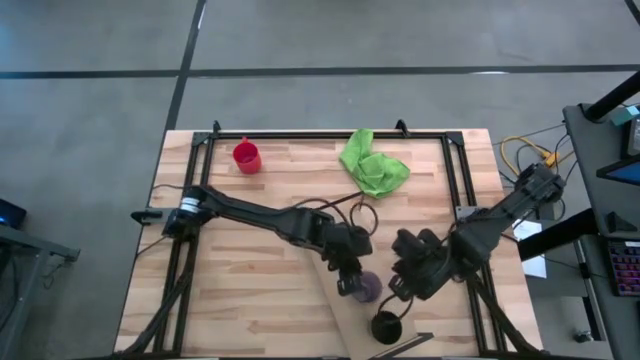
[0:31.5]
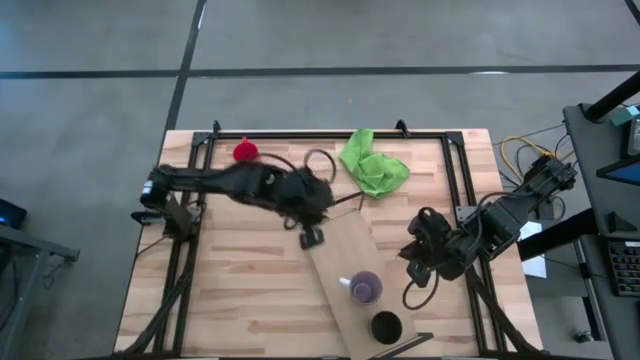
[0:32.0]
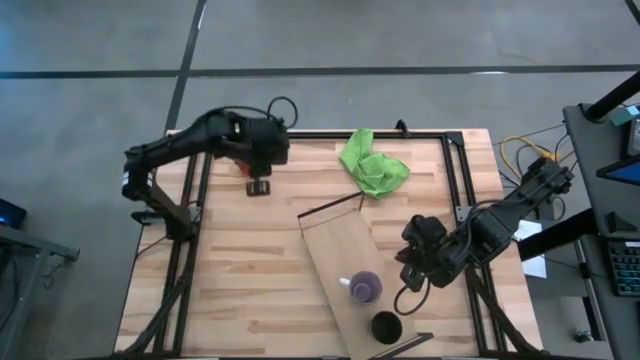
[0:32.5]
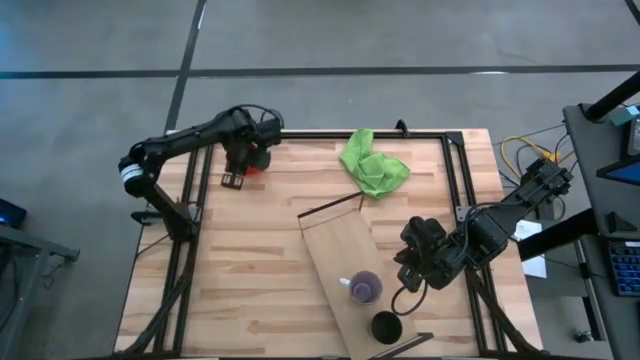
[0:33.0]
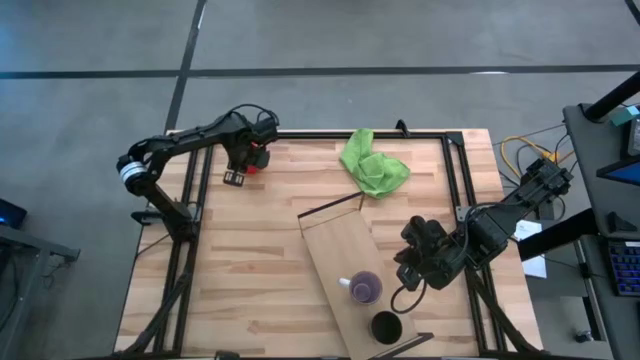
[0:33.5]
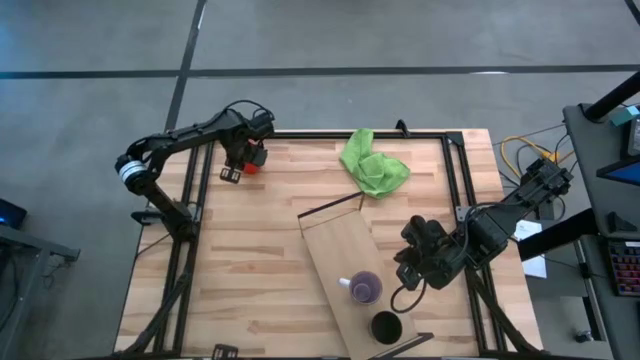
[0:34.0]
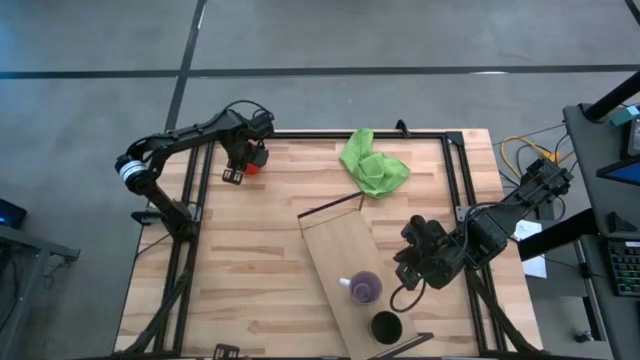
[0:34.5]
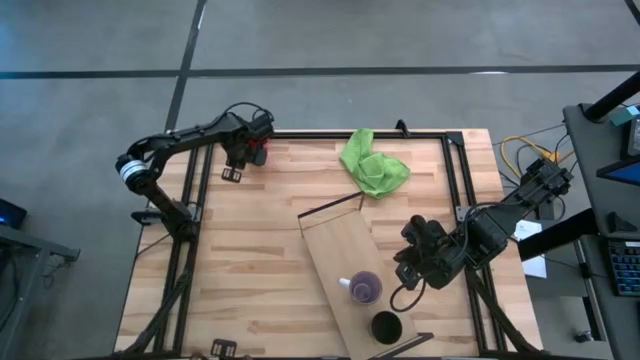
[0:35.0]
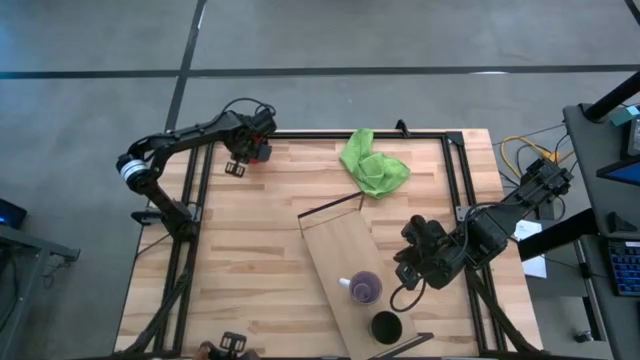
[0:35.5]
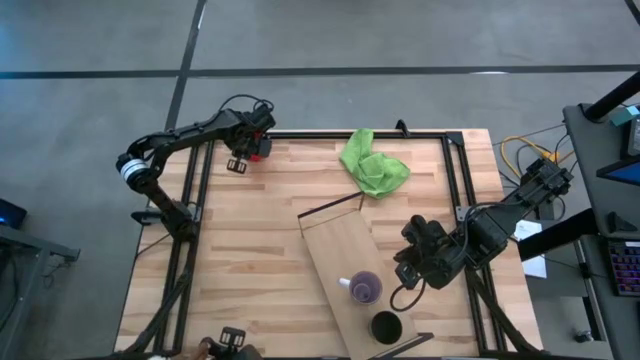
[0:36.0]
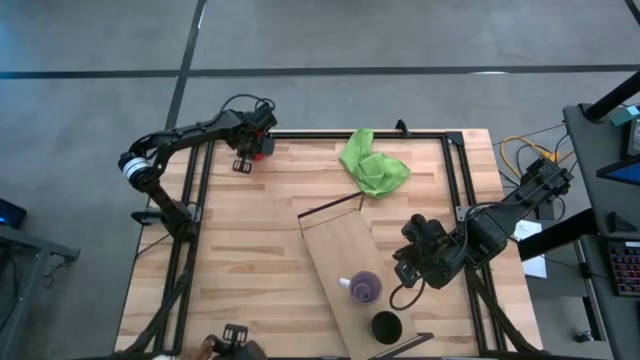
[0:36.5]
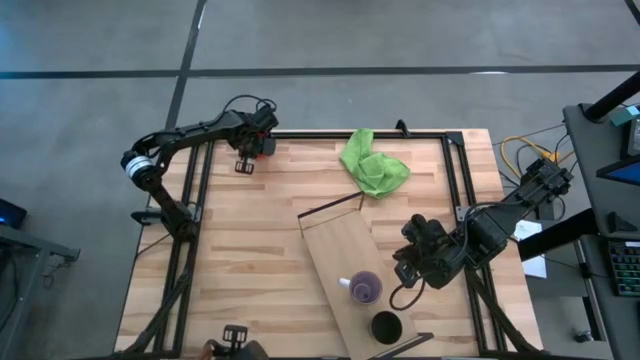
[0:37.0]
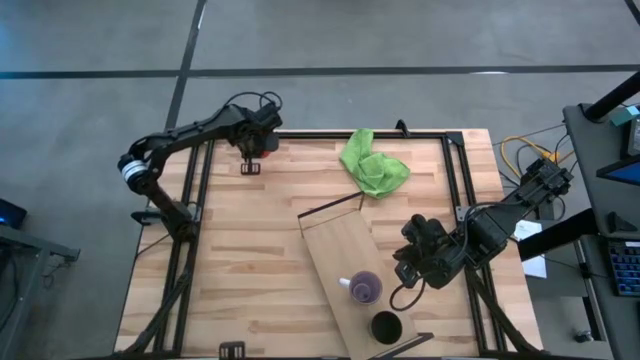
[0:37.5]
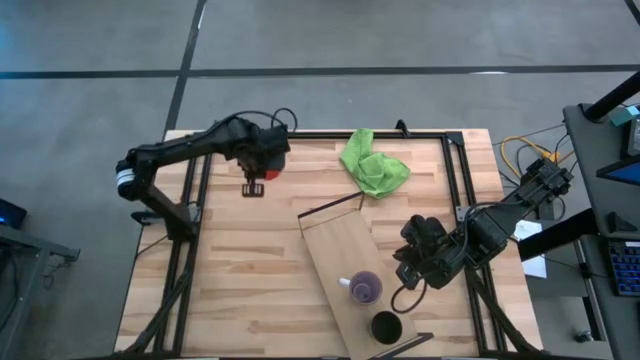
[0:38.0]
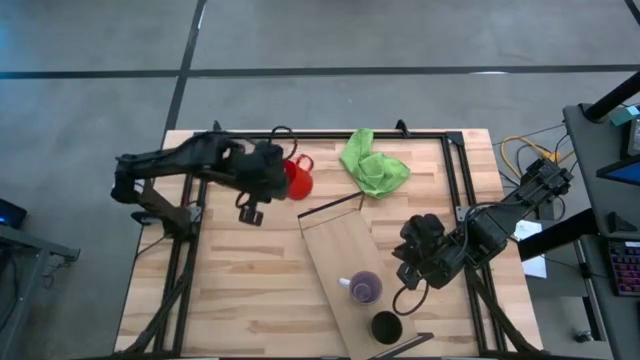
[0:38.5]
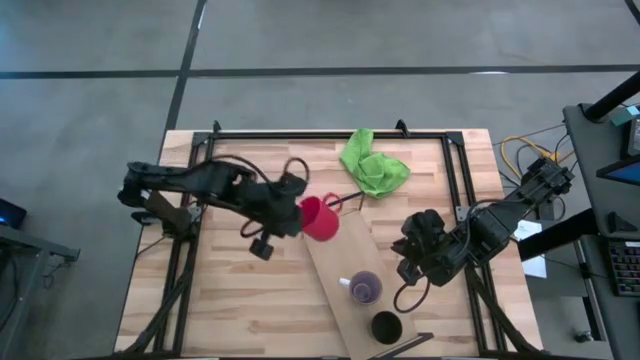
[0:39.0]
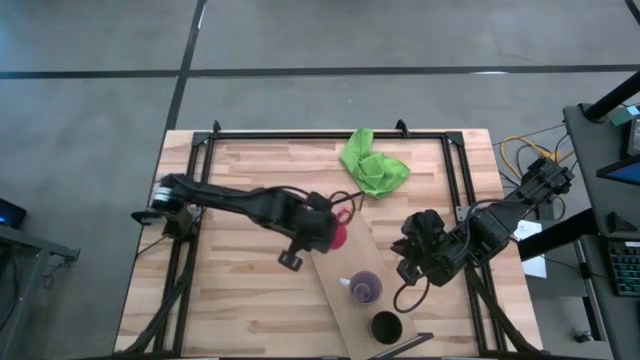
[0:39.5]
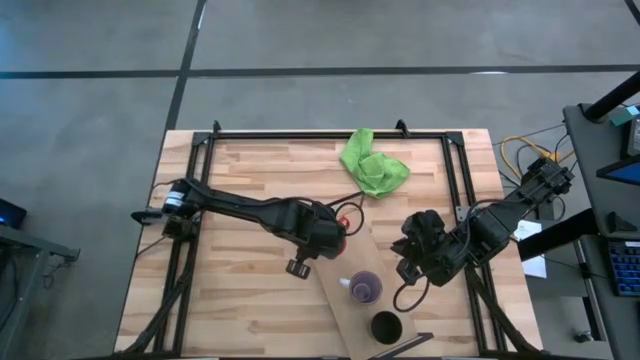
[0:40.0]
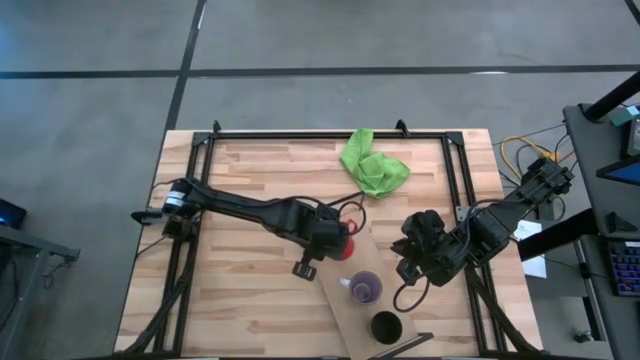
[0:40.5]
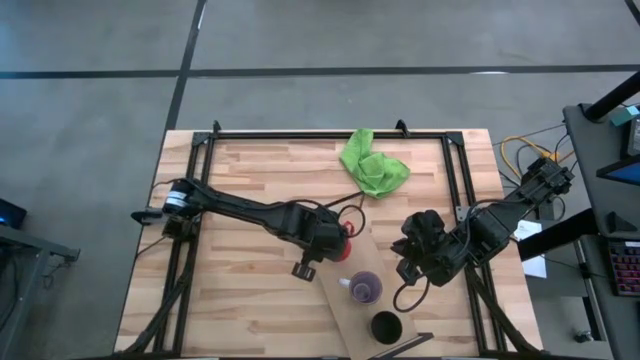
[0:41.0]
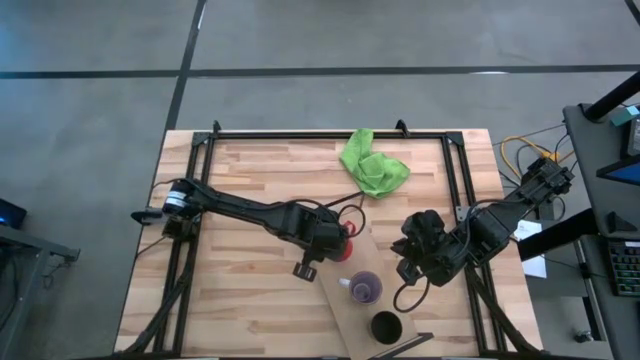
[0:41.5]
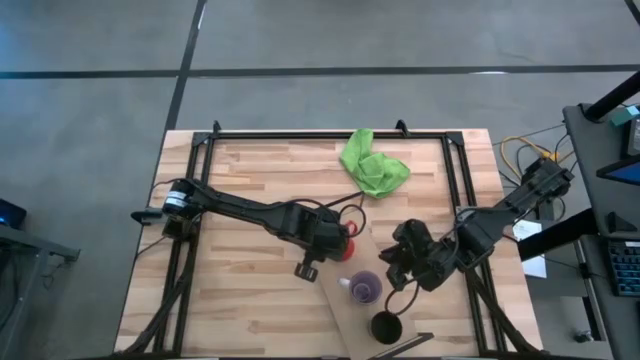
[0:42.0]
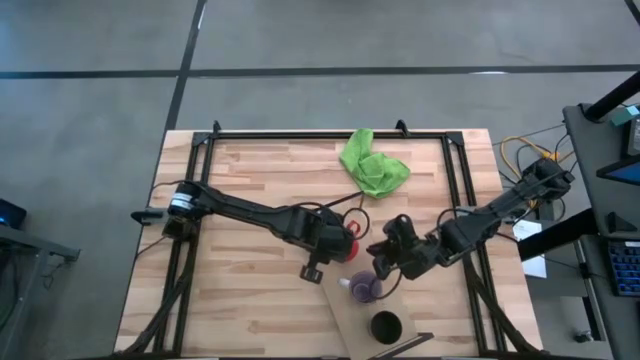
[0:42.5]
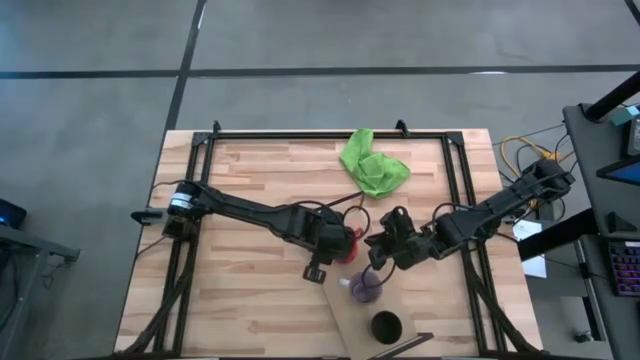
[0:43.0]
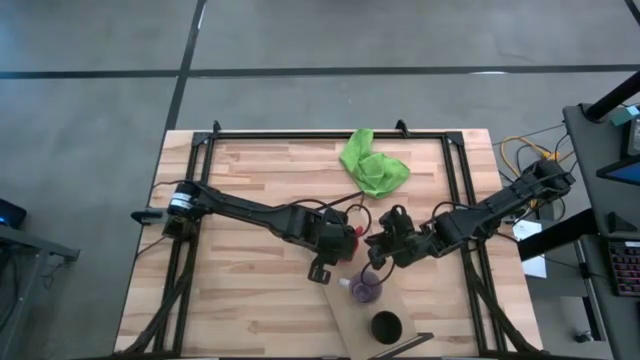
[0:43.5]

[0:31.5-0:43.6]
Task: Stack small to large cups/mugs on shelf
Put the red mug on the shelf

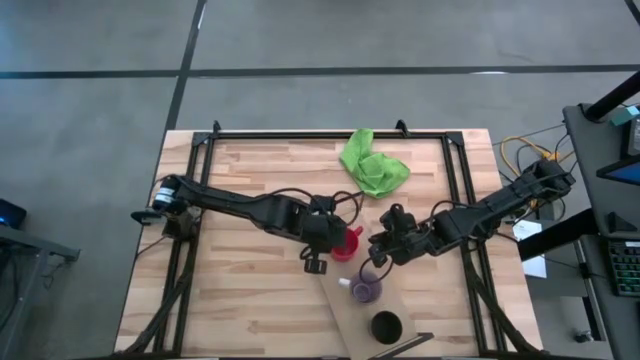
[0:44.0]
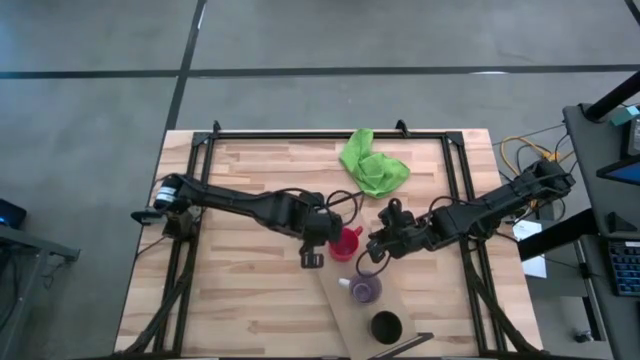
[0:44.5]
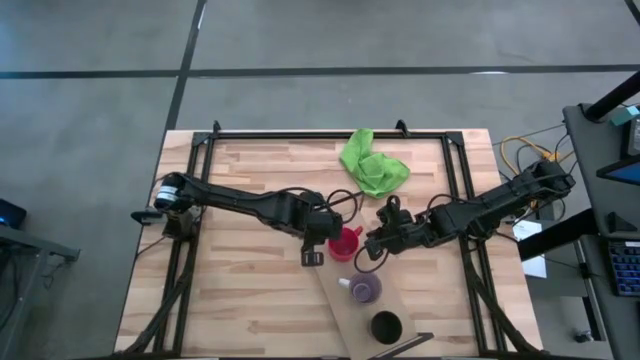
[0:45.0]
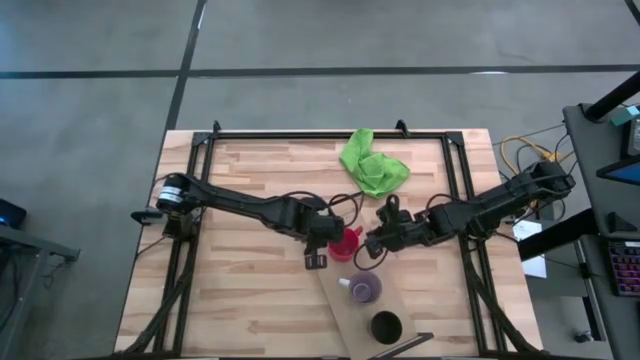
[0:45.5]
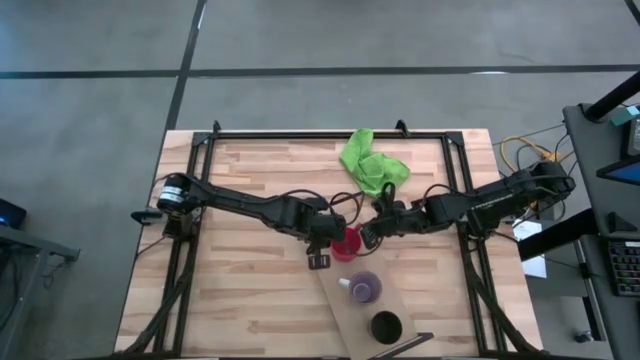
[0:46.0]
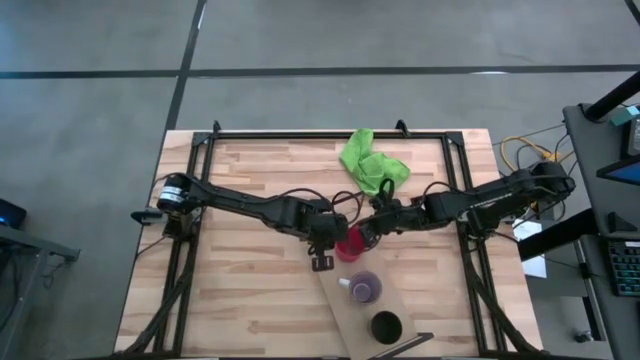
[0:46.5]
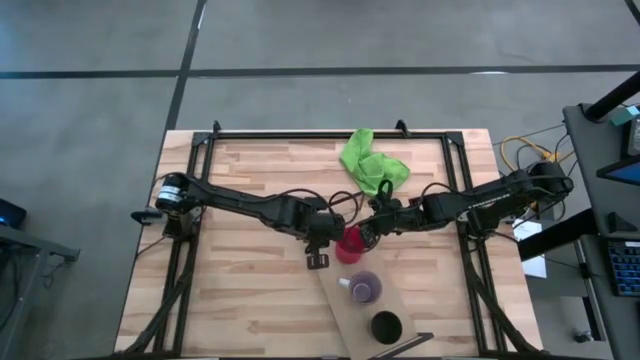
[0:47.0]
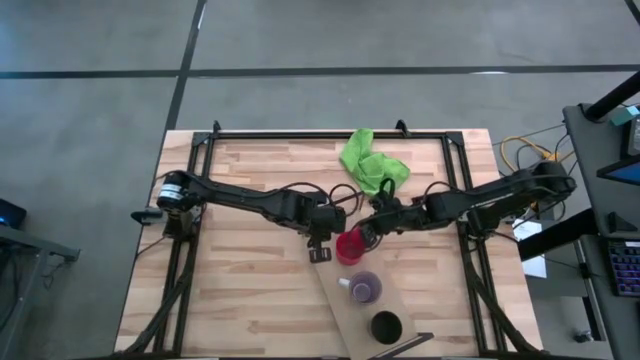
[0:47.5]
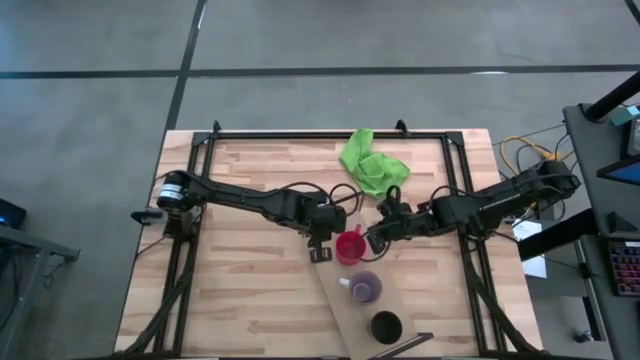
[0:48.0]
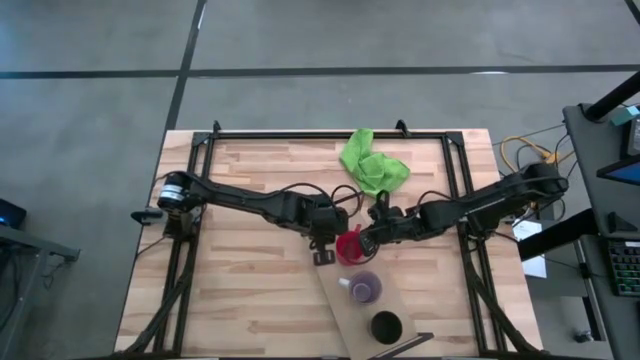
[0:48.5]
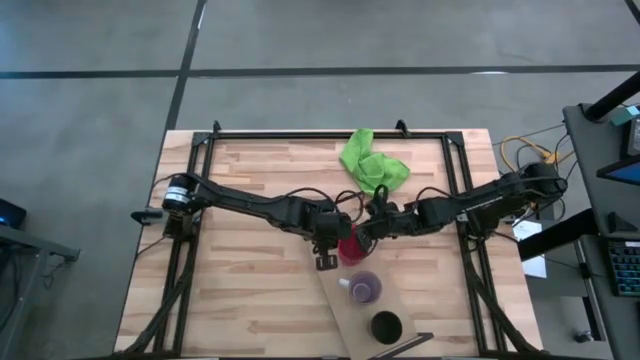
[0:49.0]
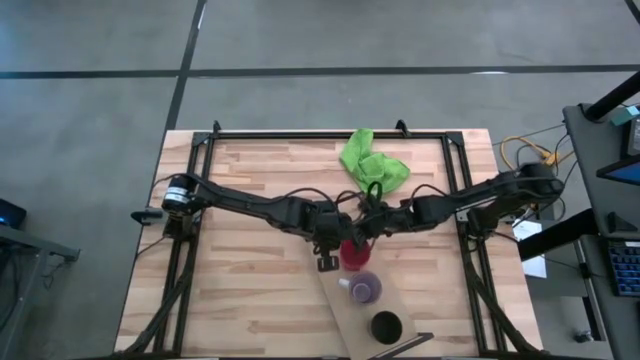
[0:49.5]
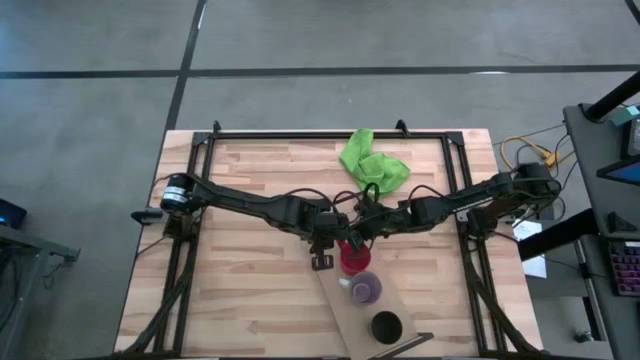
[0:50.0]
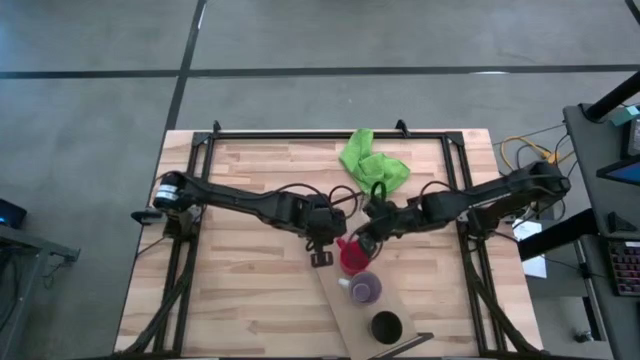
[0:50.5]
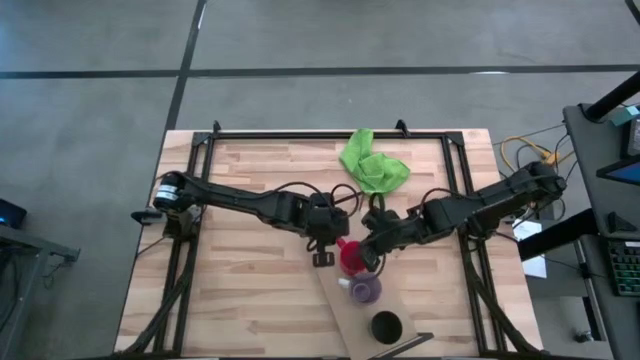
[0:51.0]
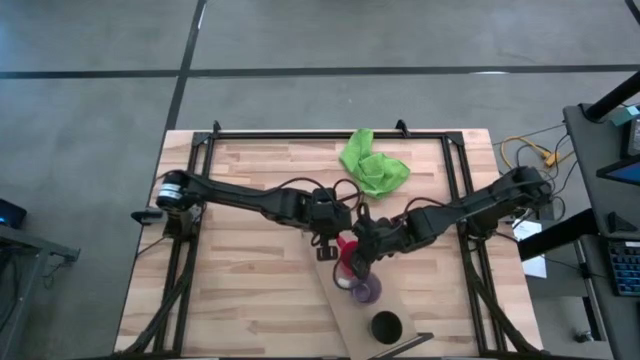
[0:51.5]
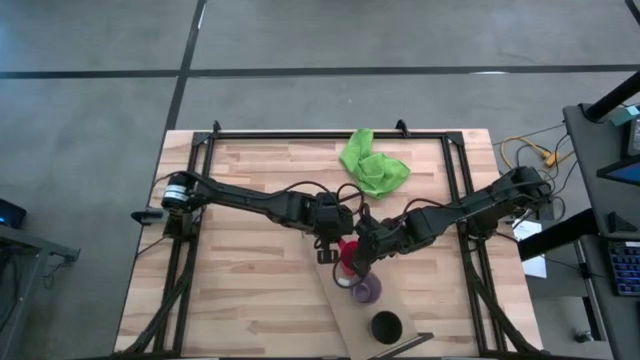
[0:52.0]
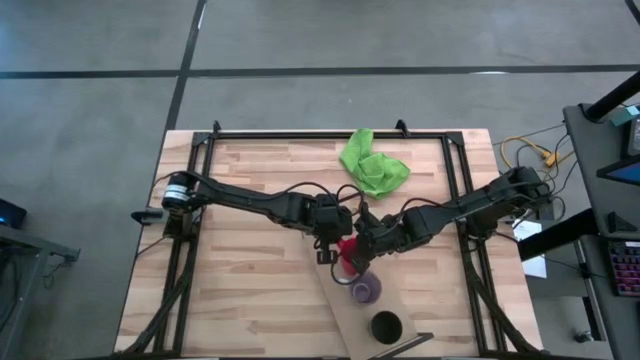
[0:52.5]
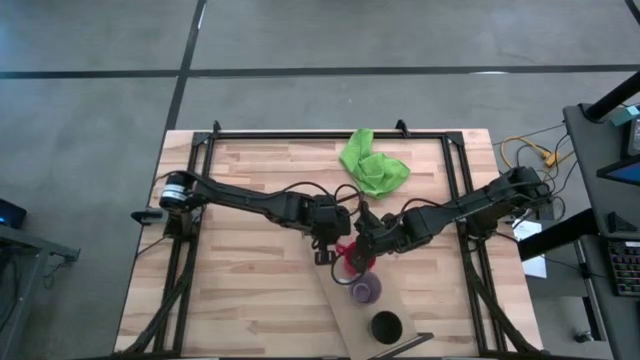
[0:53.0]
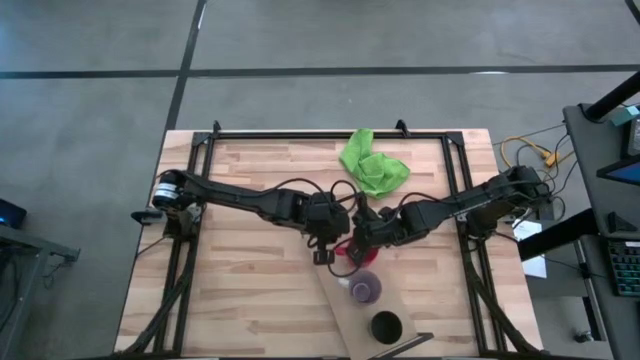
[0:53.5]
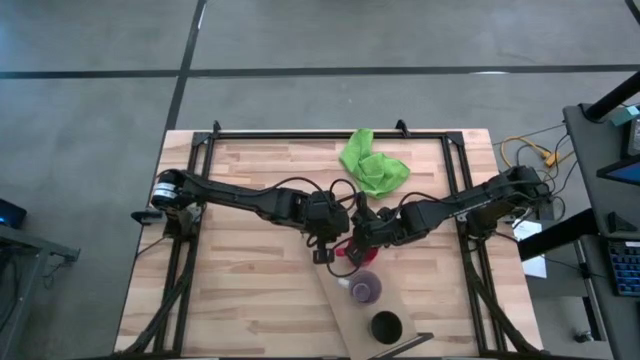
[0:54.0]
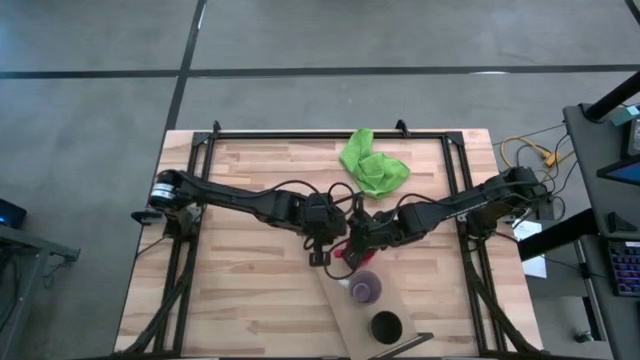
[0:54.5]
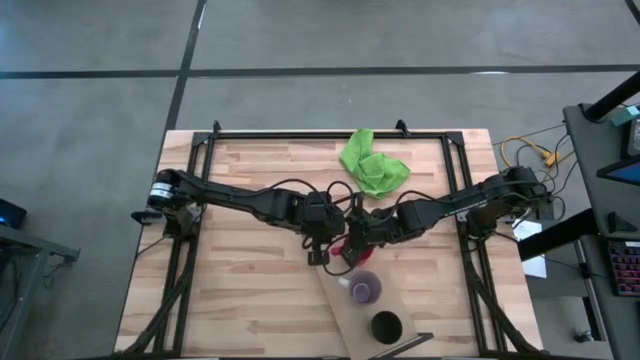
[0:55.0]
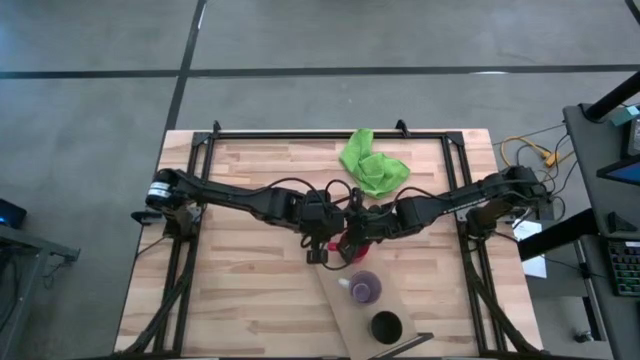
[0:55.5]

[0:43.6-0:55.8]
Put the red mug on the shelf
